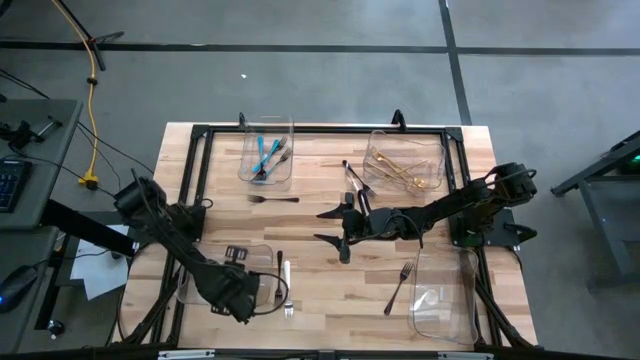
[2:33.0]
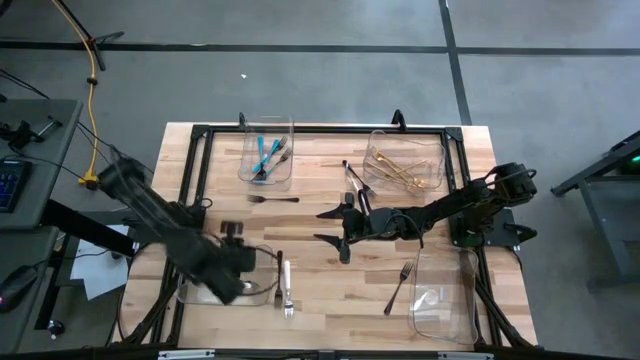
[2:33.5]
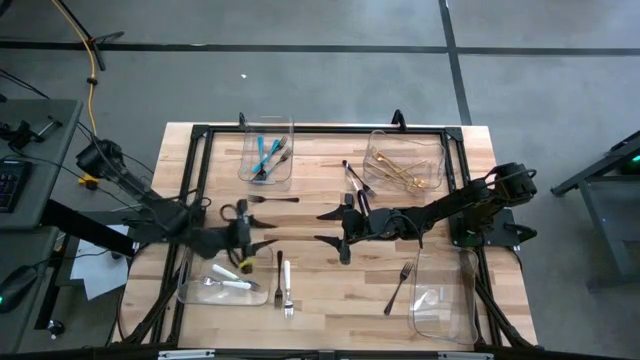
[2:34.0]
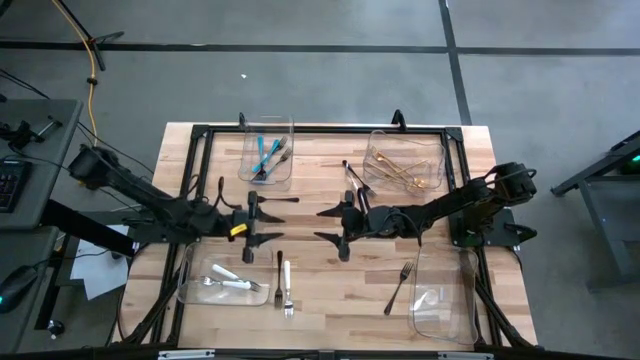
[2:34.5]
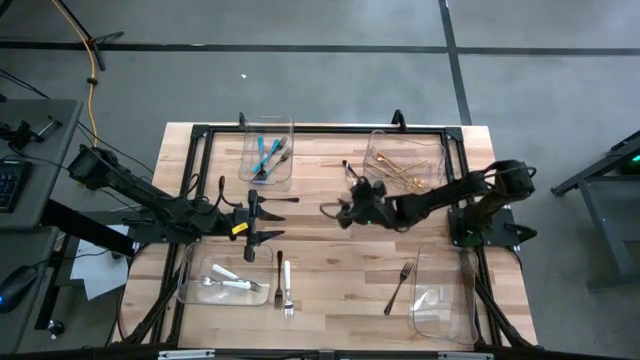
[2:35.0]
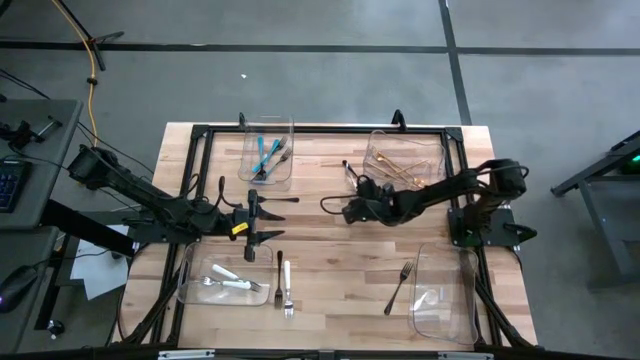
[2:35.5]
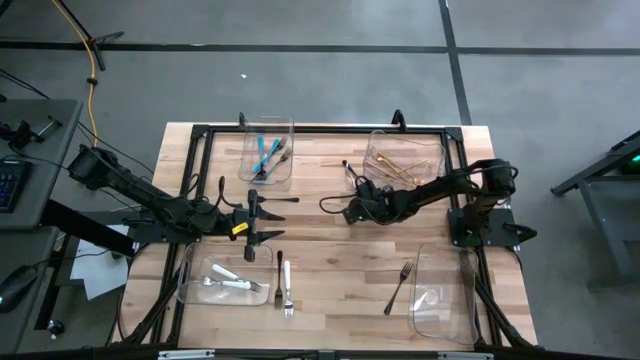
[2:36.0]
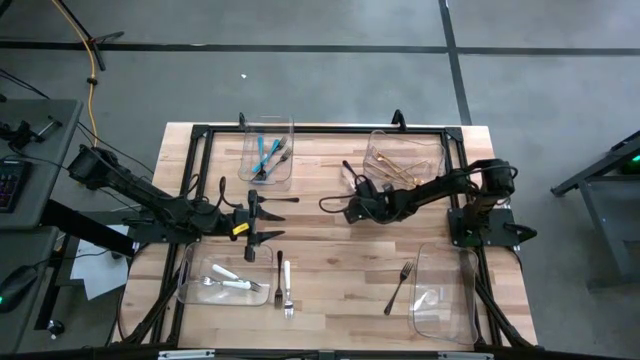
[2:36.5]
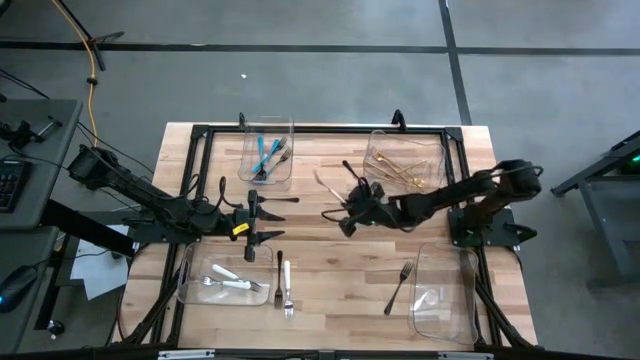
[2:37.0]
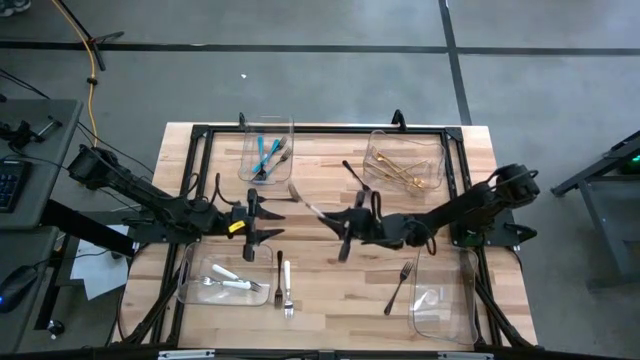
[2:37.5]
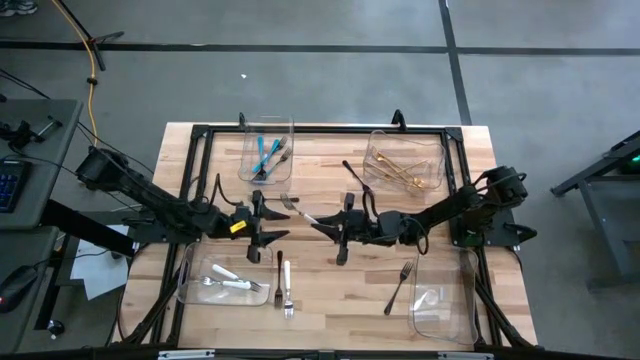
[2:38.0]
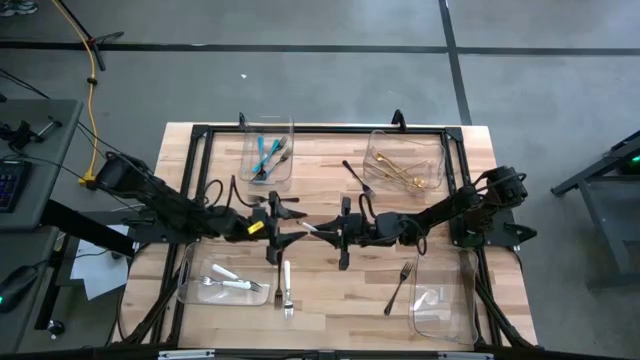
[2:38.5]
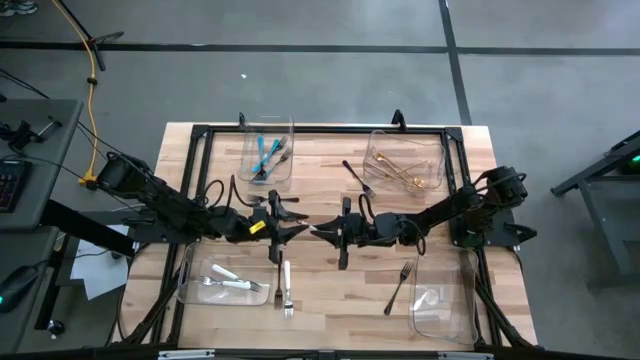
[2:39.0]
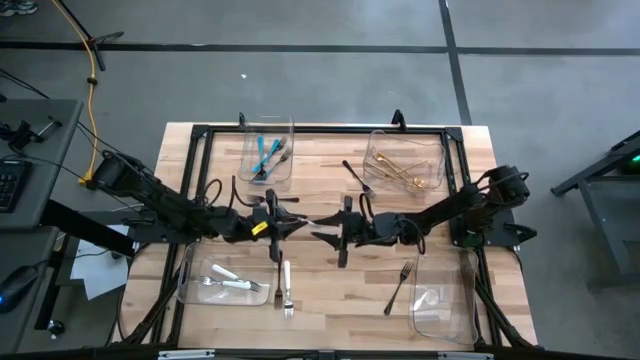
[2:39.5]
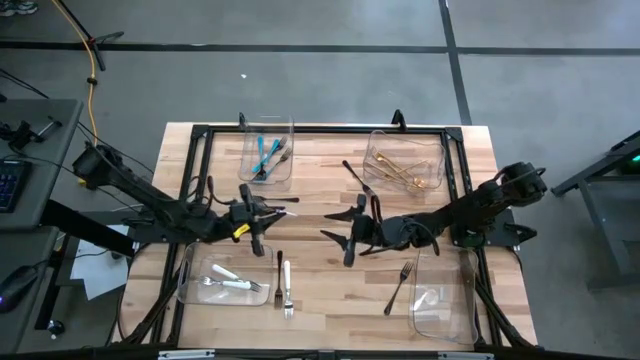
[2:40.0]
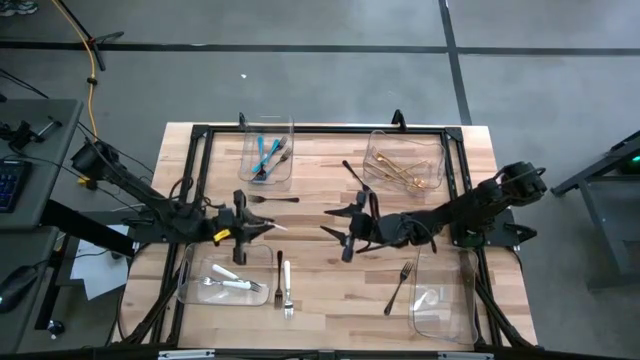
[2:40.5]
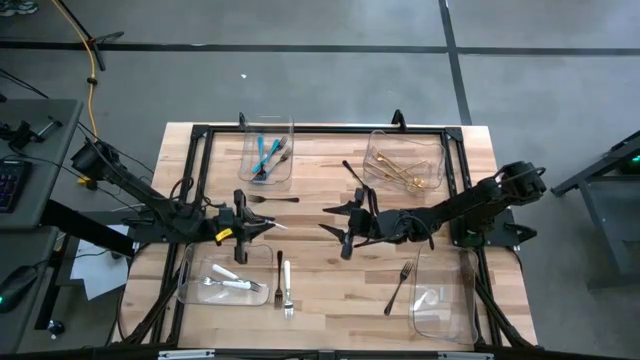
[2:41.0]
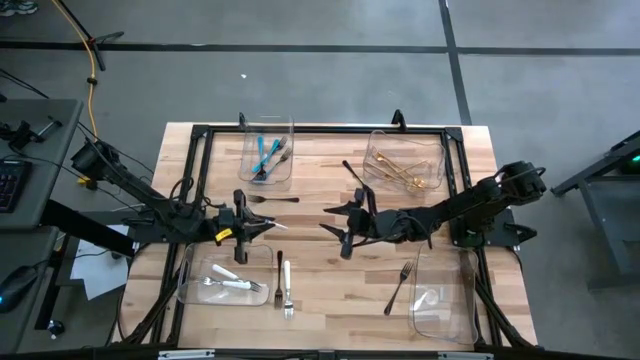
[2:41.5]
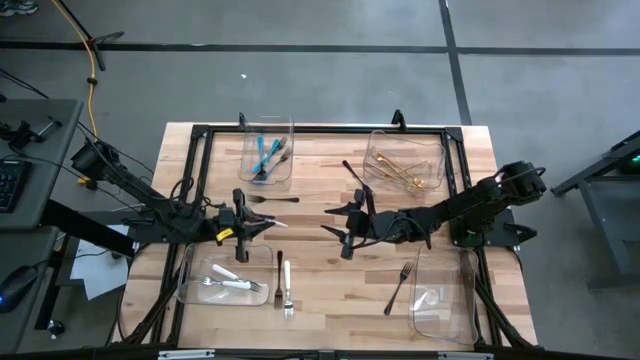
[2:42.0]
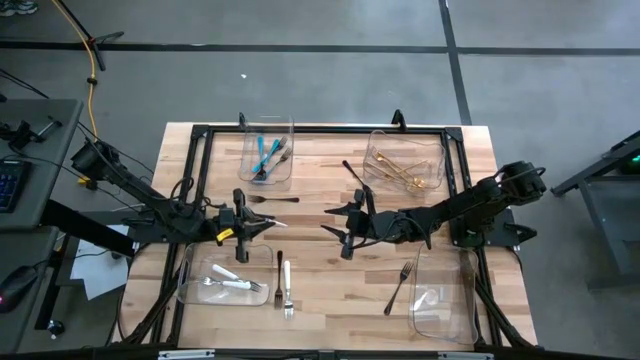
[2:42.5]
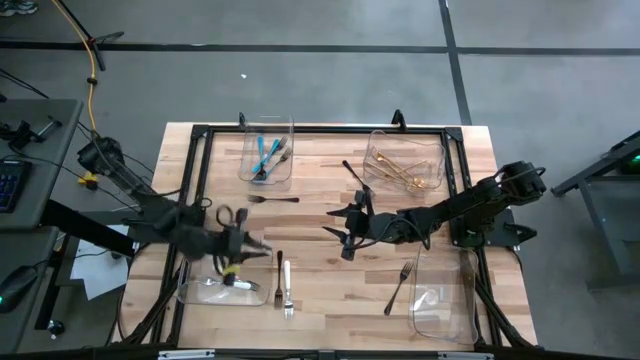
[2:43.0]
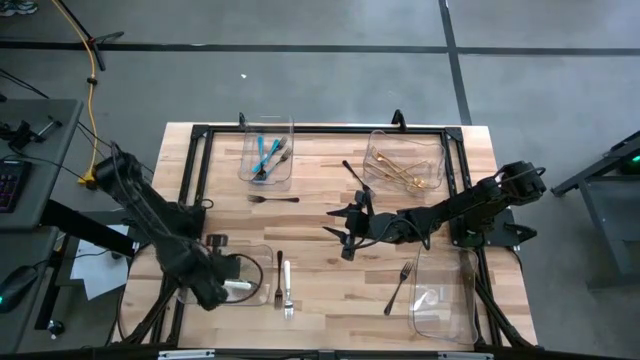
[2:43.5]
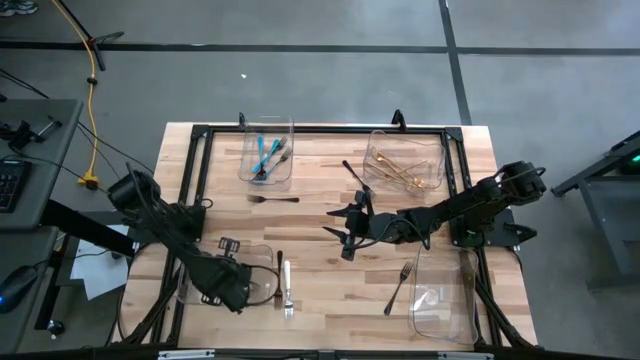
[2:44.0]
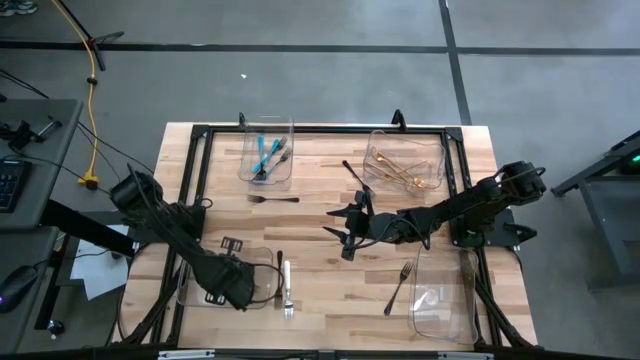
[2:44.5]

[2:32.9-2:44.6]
Task: Sort silverware by color (type)
Put the white fork into the bottom left transparent bin

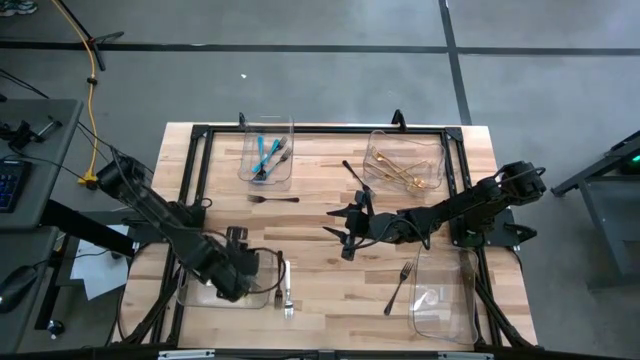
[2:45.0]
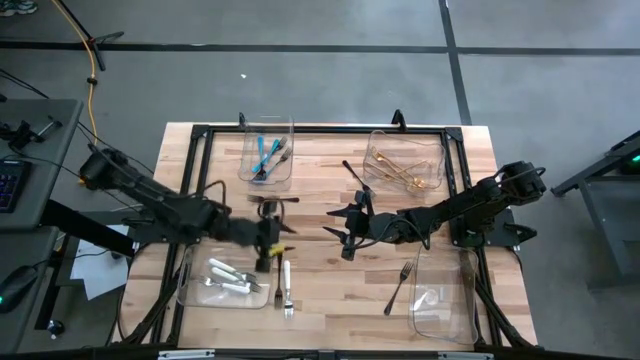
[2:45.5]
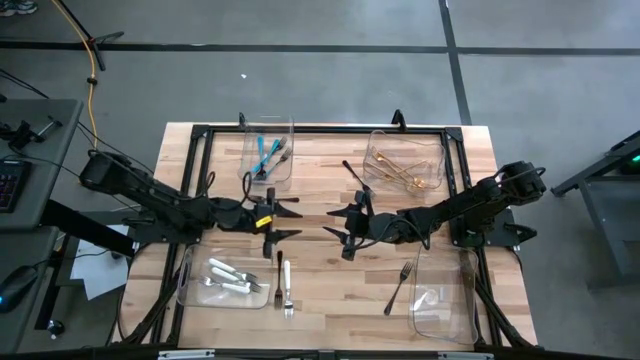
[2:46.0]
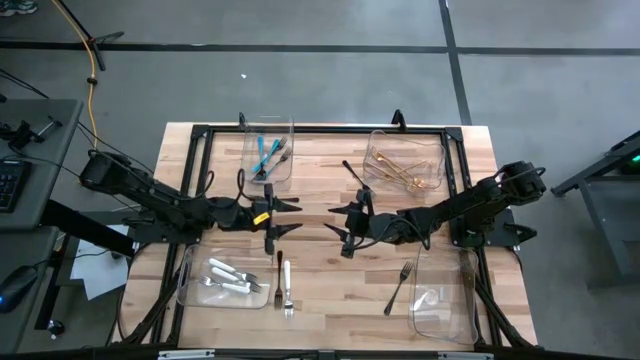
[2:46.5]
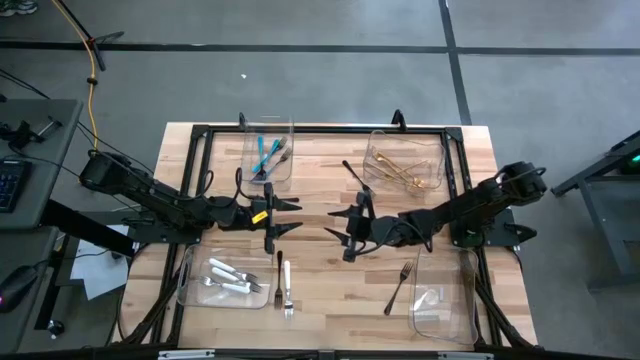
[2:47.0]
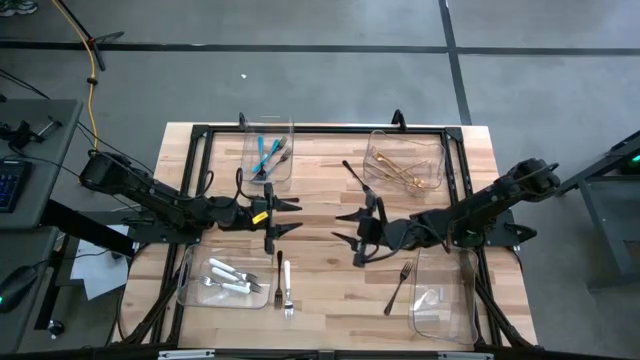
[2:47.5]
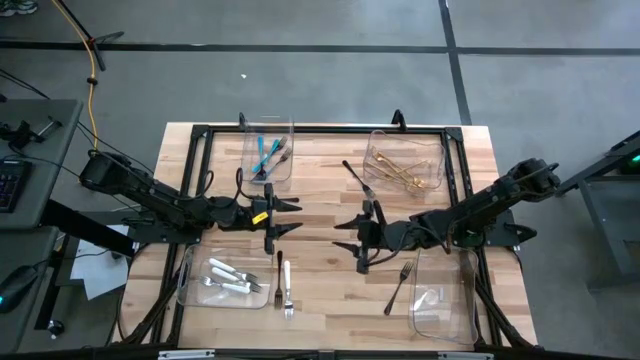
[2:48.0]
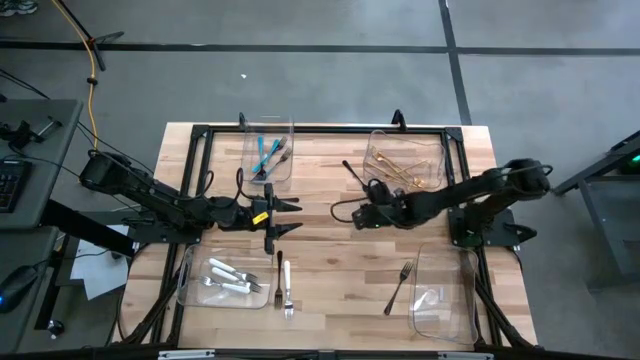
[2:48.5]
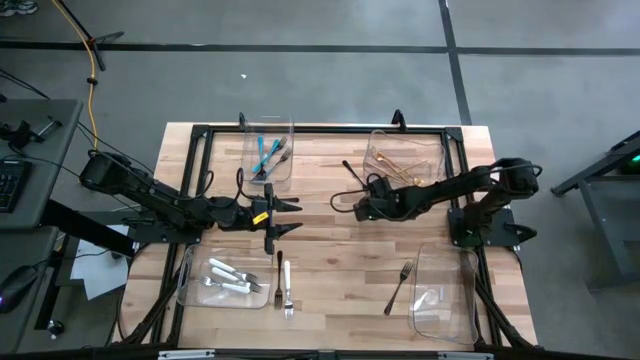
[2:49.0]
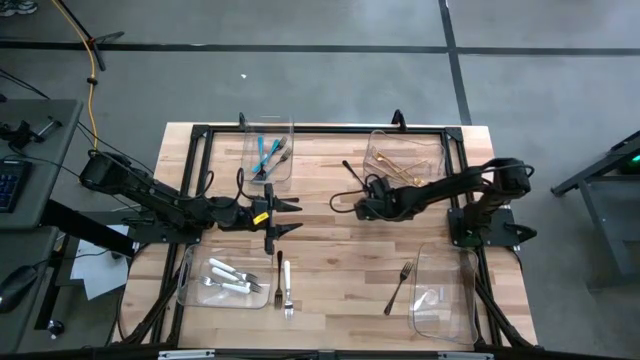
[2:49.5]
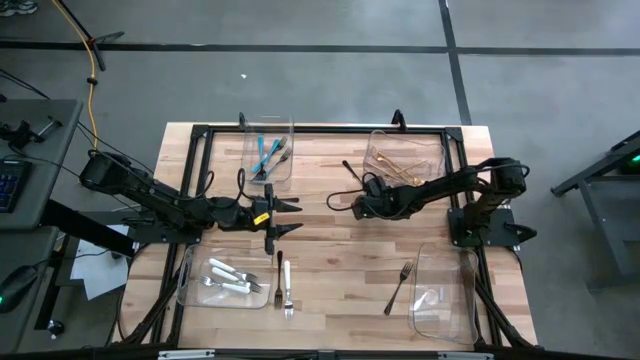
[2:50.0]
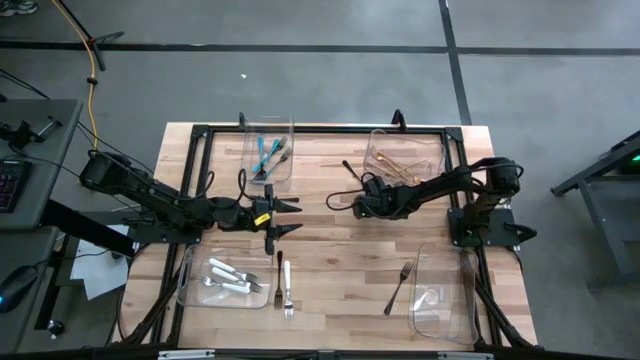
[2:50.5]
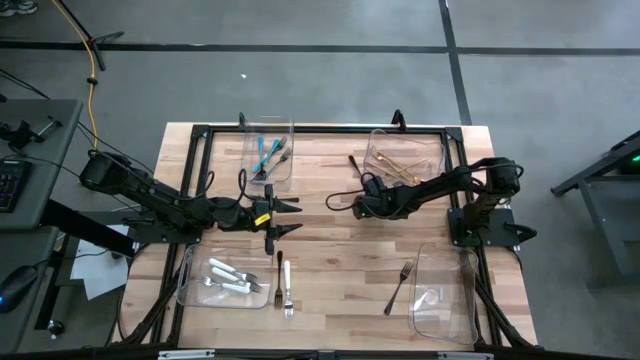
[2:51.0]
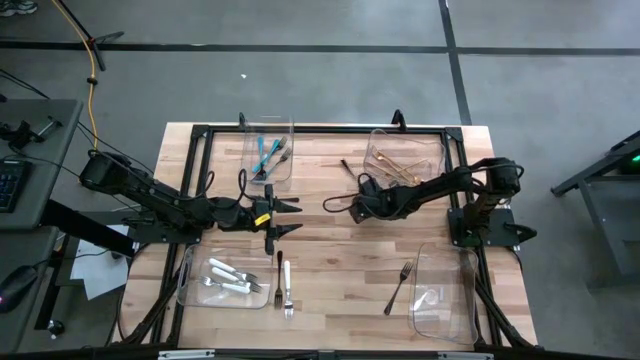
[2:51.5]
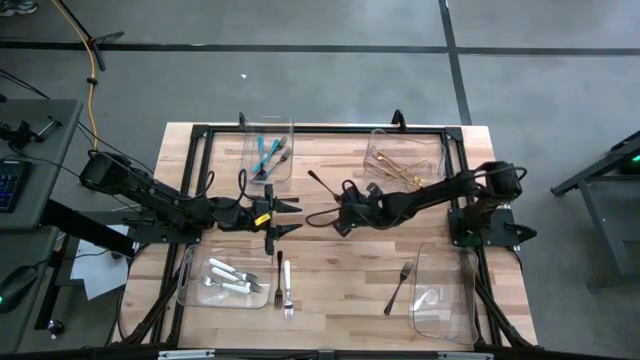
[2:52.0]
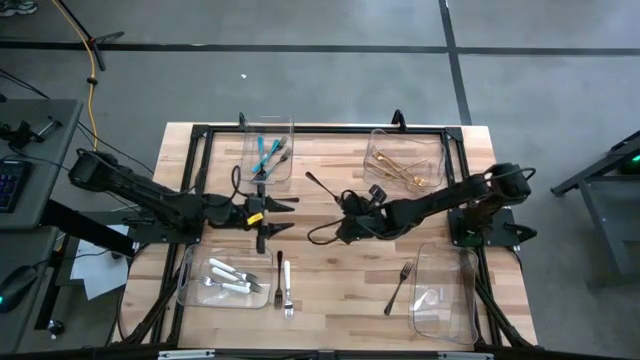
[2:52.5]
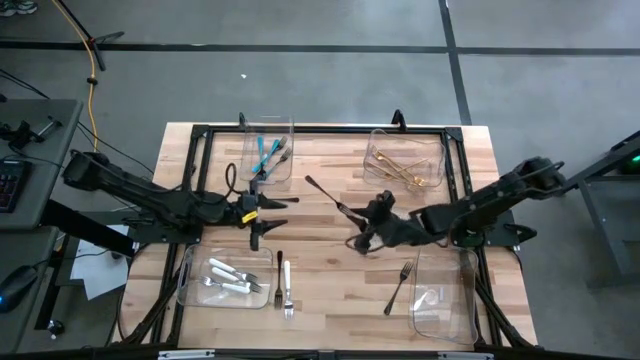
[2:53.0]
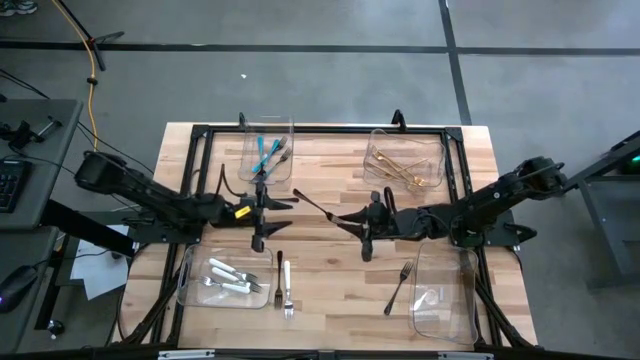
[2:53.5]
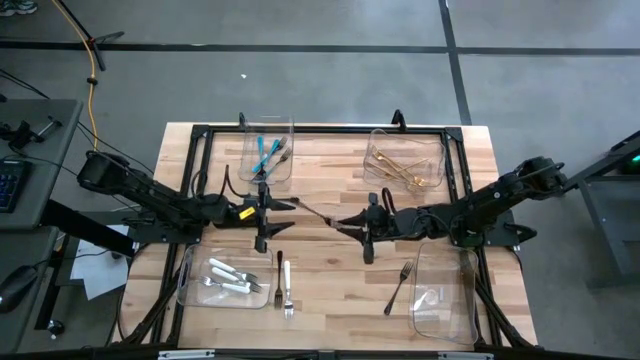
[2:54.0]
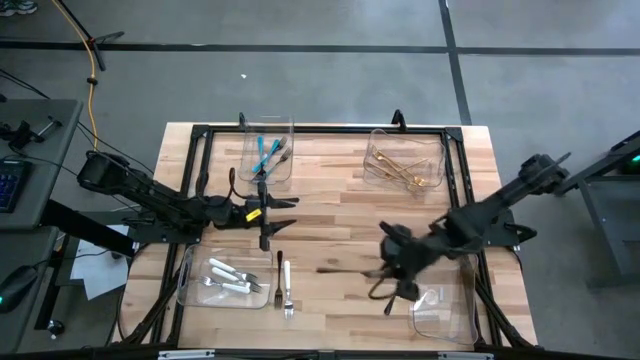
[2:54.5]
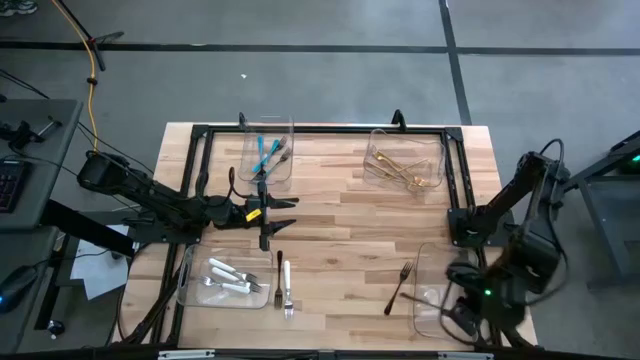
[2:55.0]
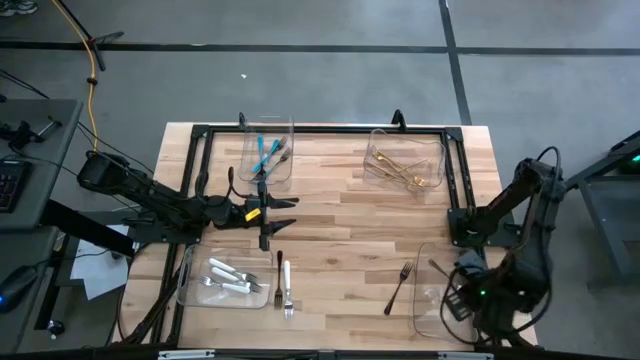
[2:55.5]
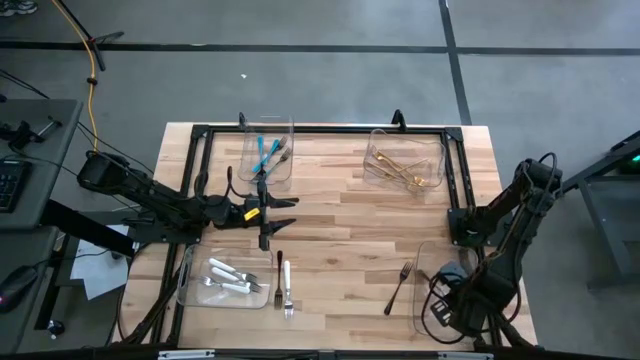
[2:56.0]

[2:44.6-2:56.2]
Put the black fork into the bottom right transparent bin
